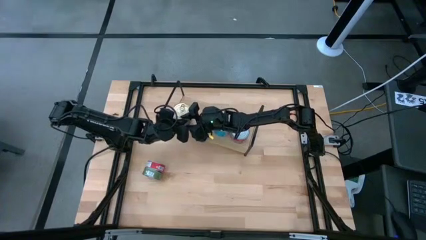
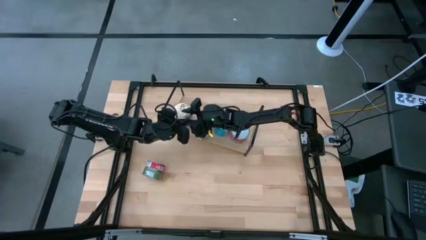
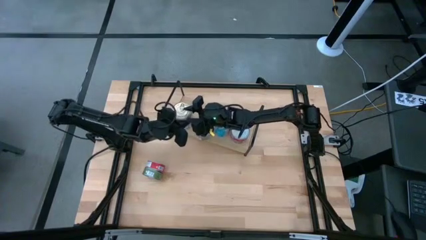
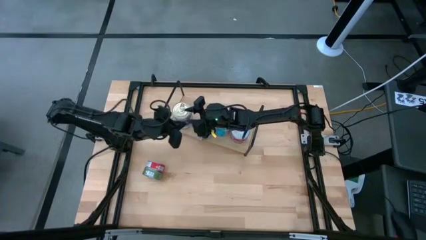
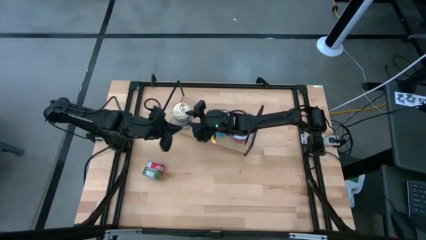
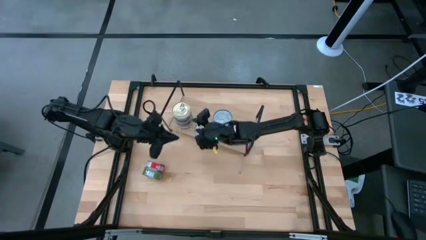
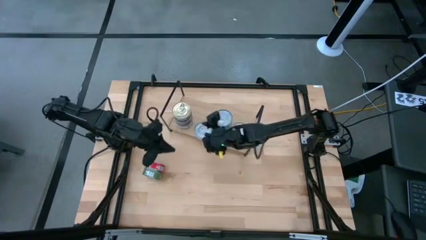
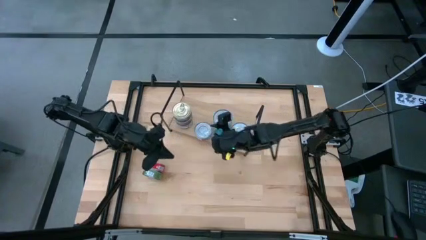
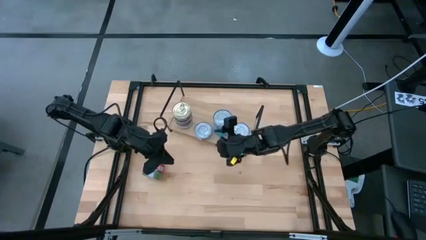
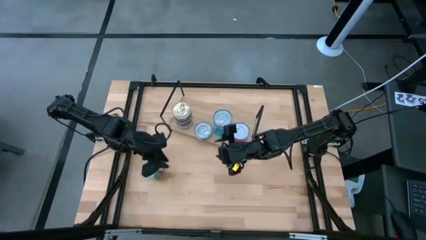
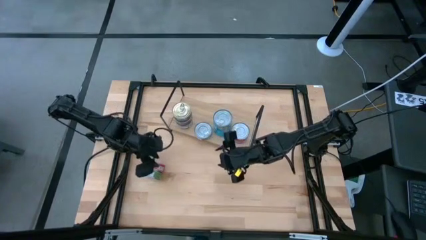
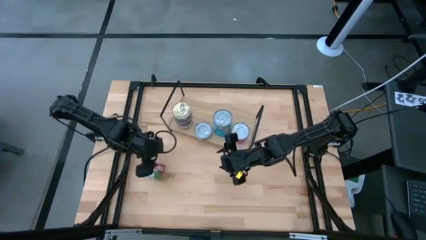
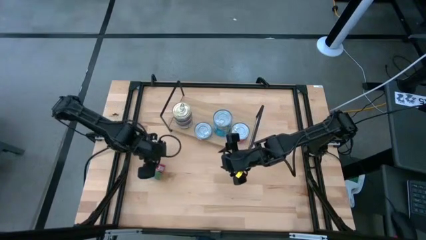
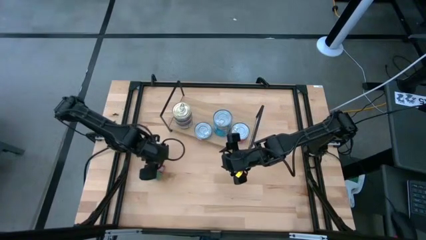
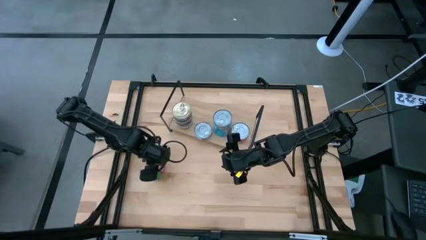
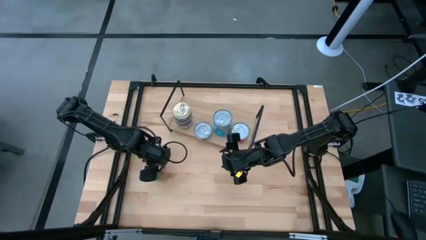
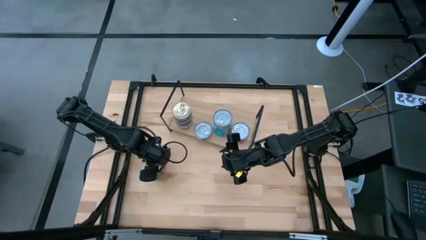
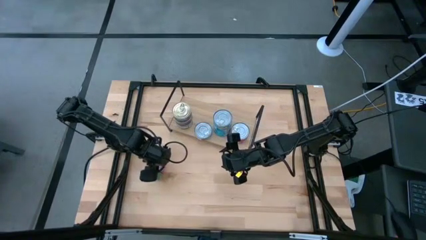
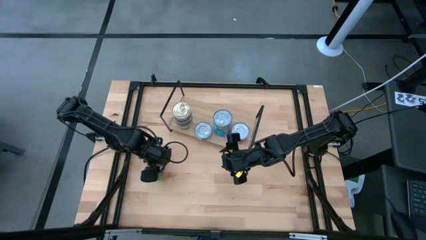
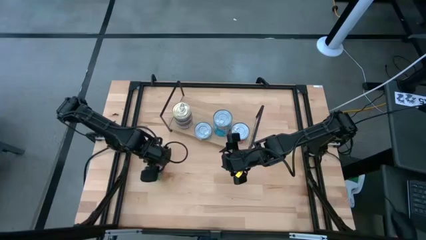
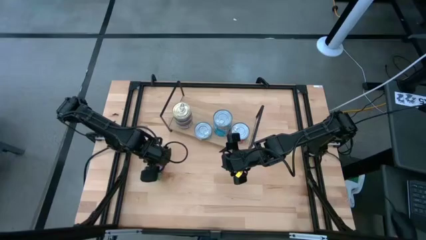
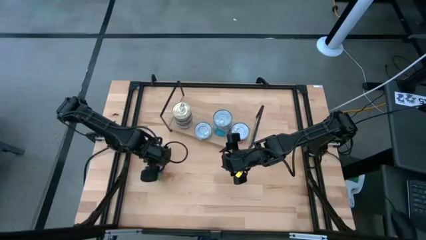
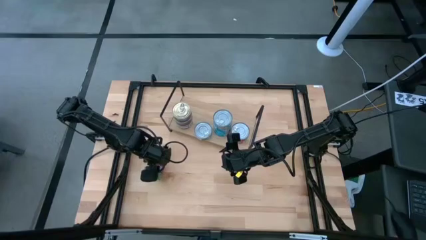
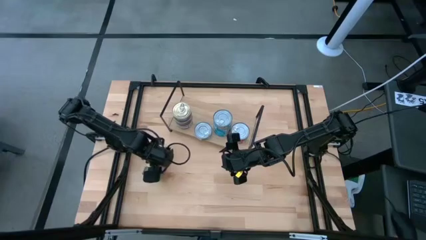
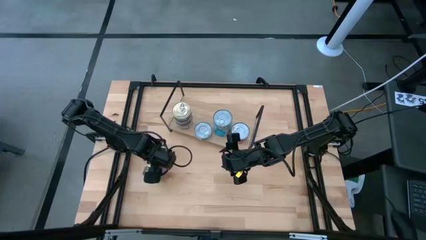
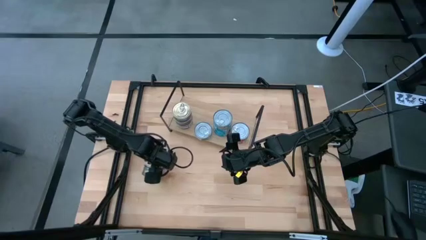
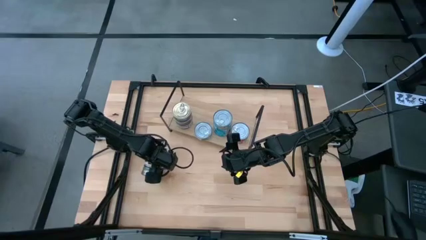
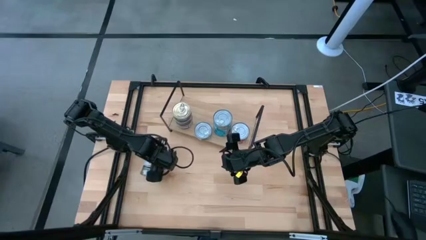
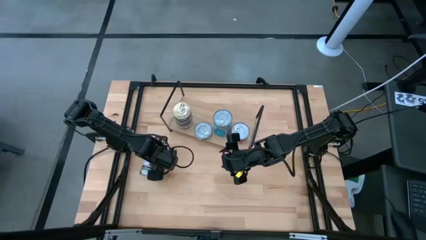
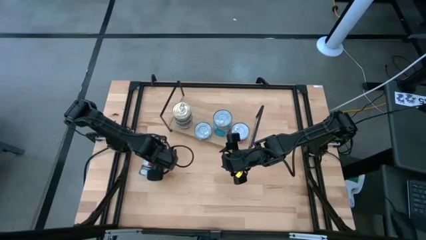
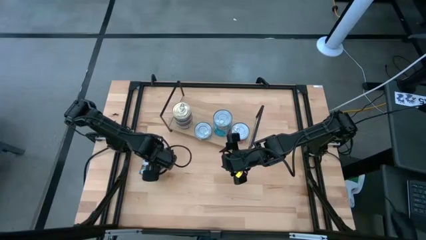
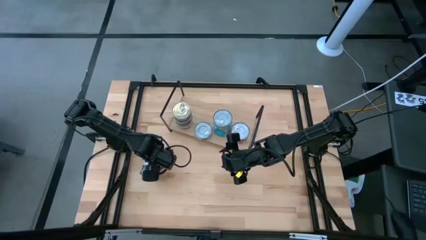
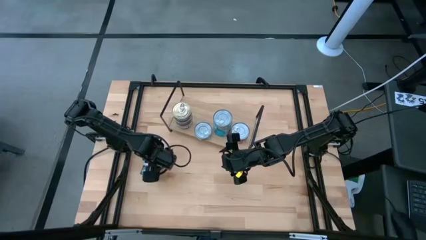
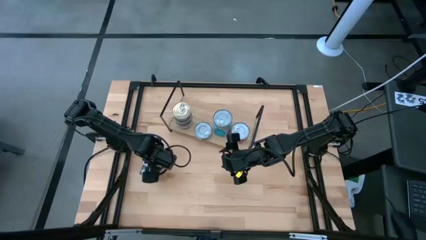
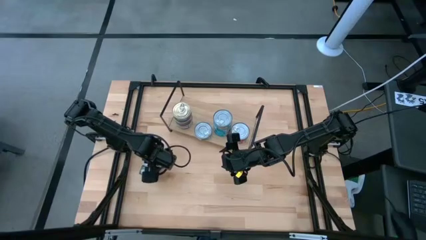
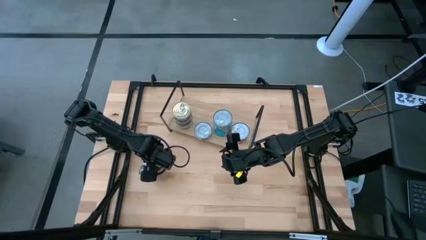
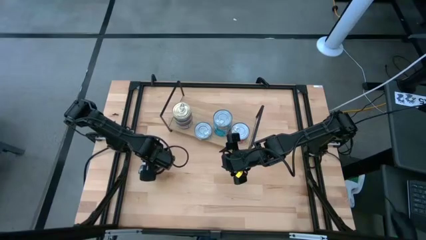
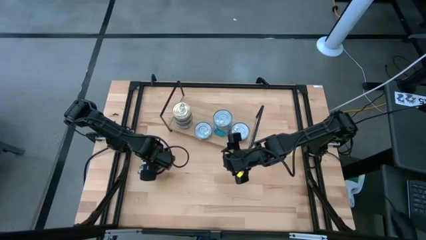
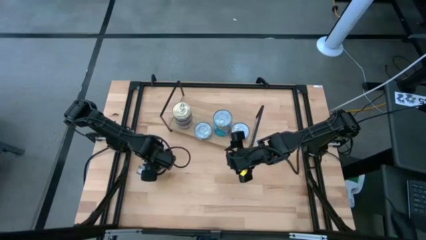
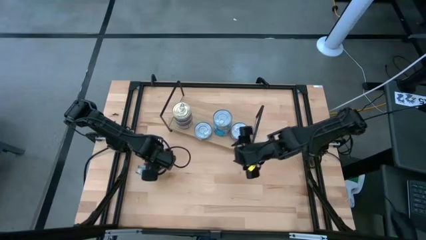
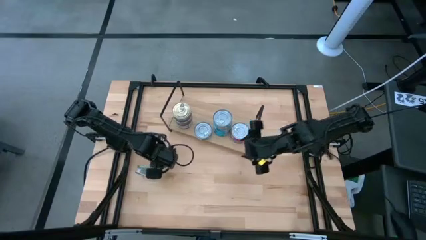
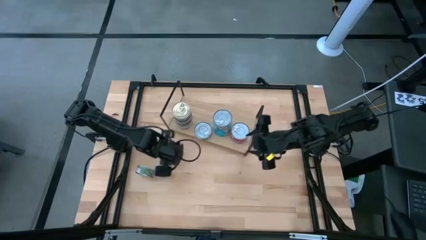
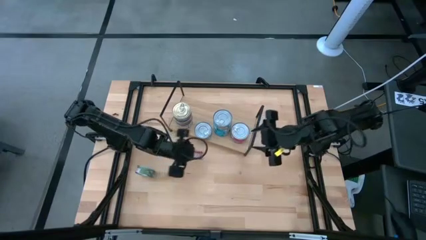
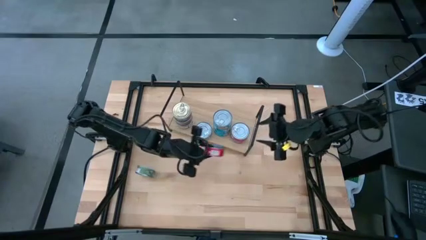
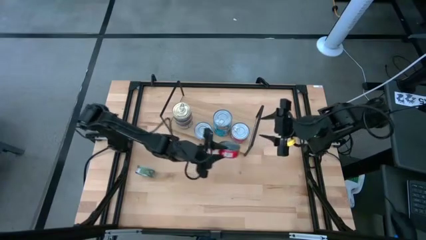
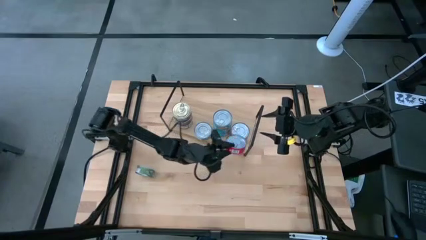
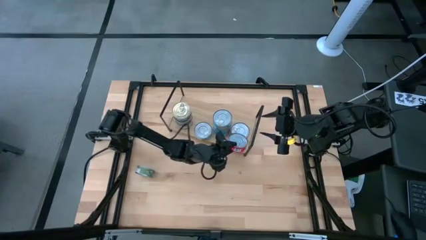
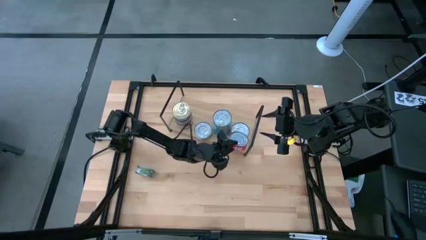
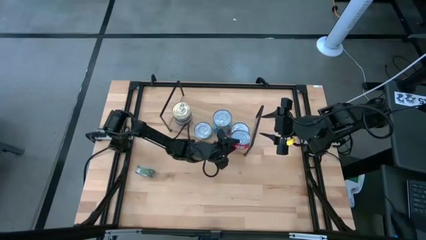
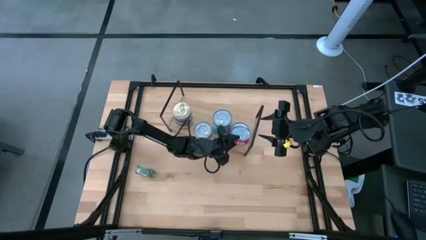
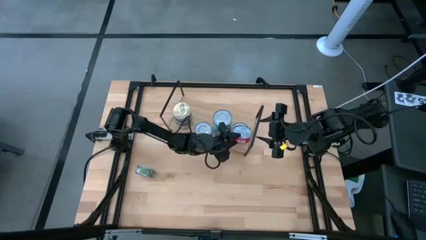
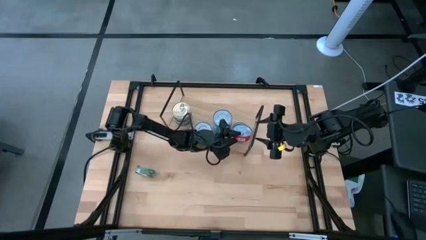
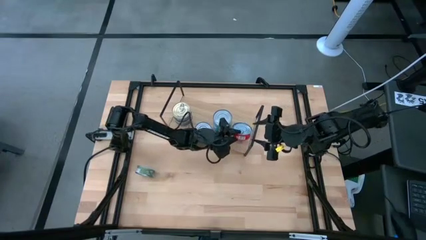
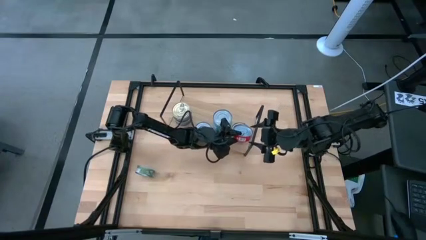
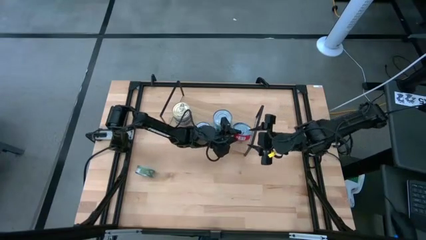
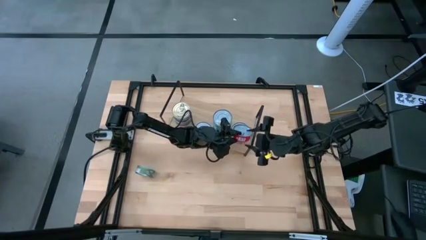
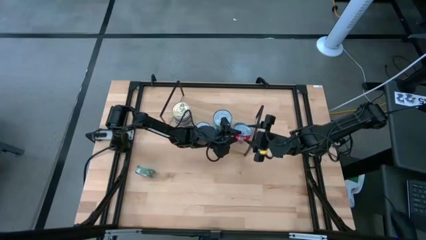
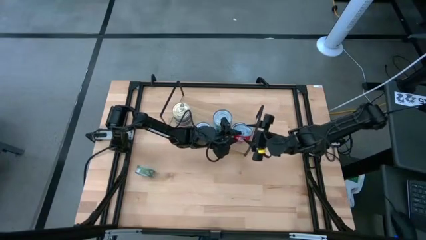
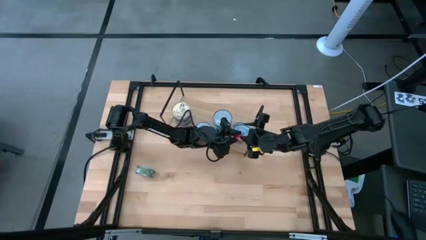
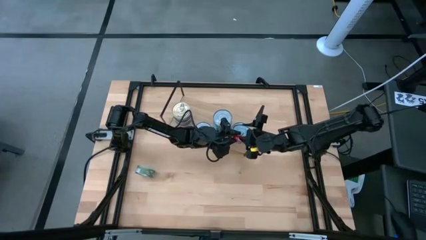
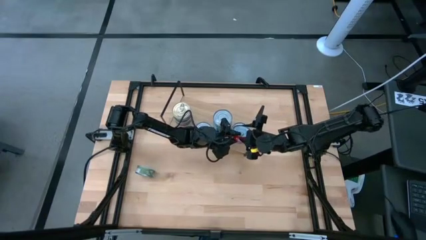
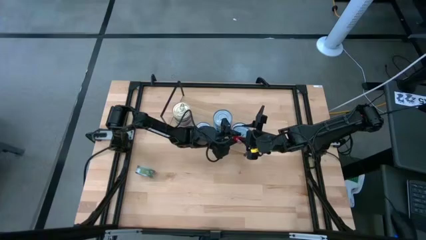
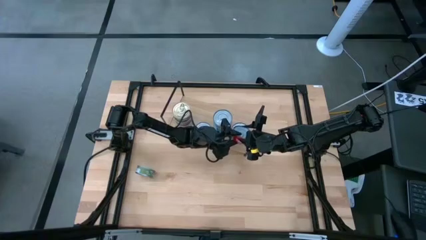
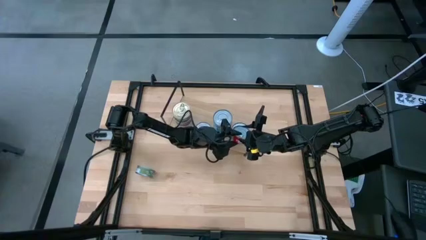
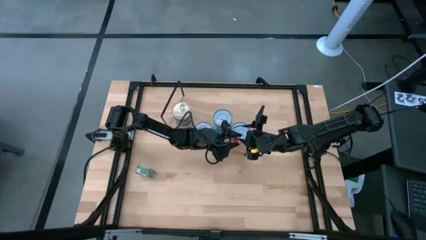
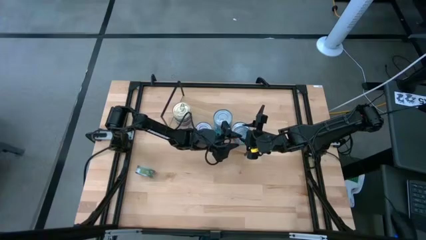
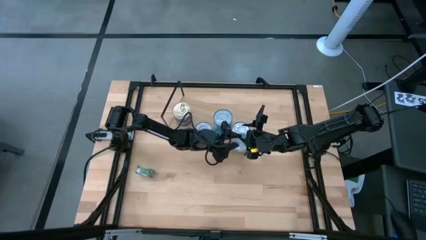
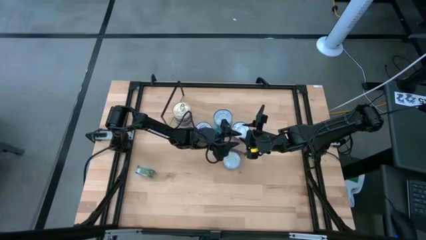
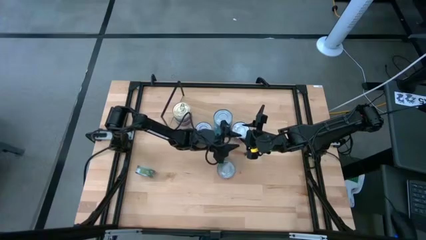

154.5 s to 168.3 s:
Task: Stack canned seafood by type on shelf
Stack the red tuna can on top of the red tuna can on the shelf

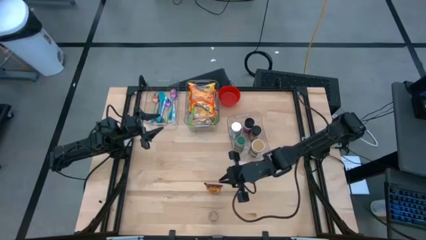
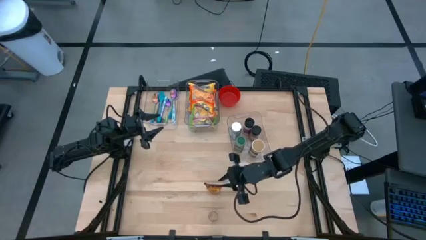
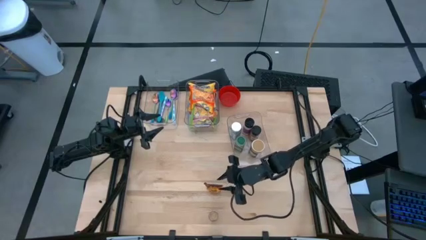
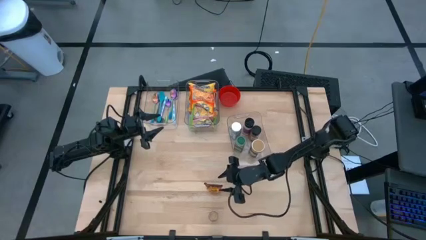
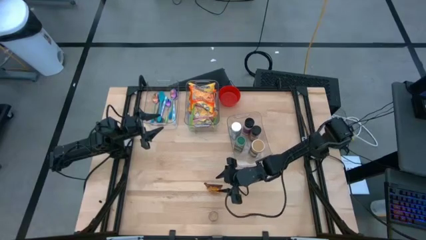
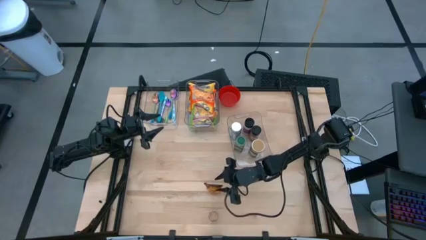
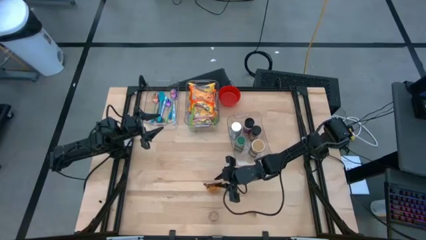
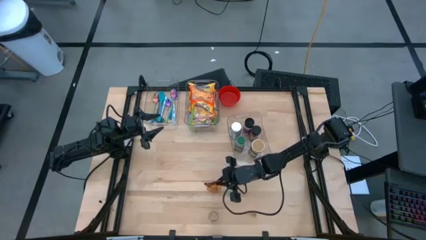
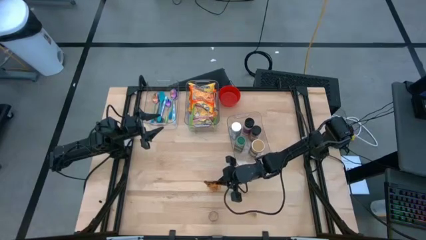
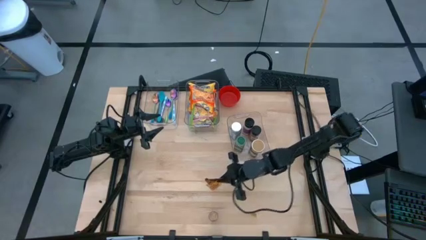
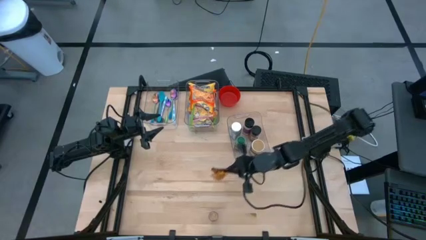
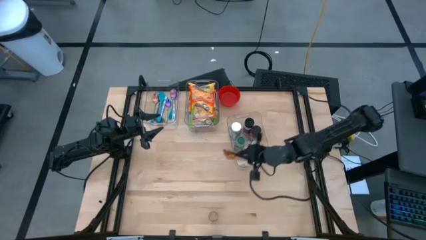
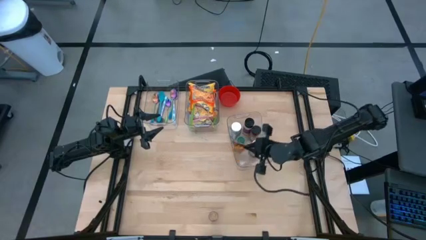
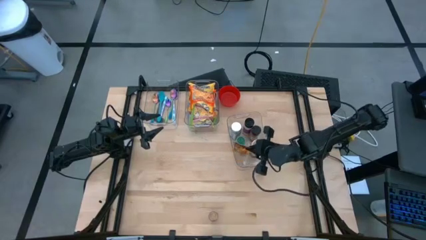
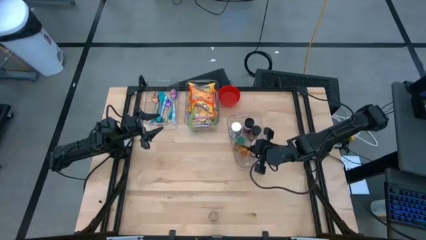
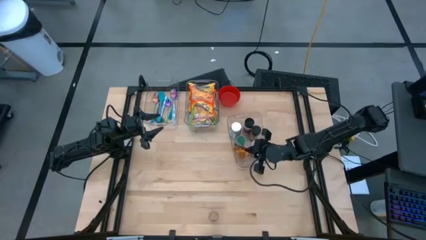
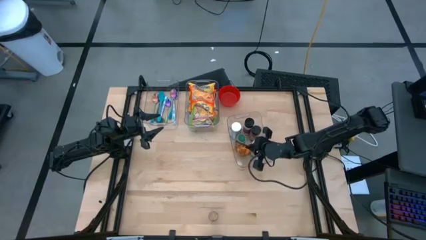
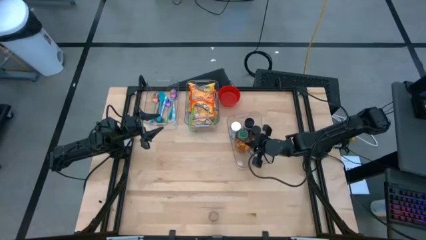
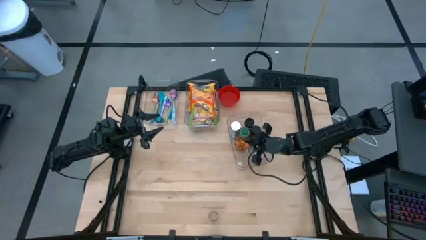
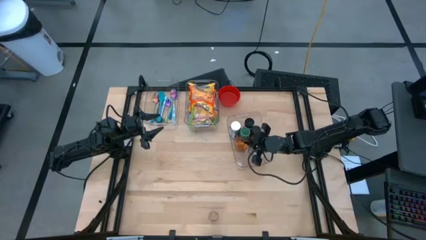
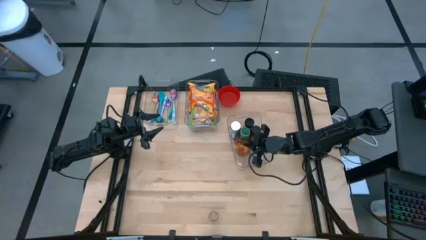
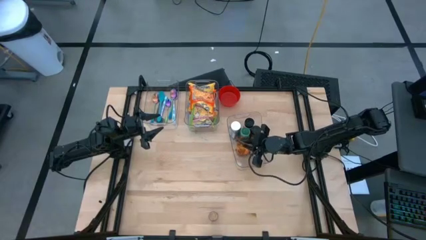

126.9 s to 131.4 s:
Task: Pick & Place Food Item
Put the orange seasoning pack into the bottom right transparent bin
